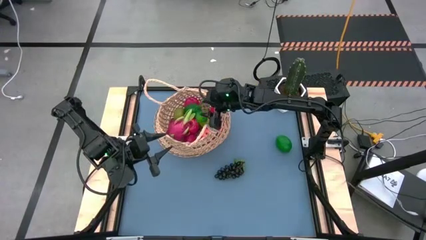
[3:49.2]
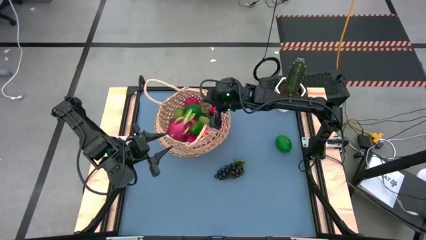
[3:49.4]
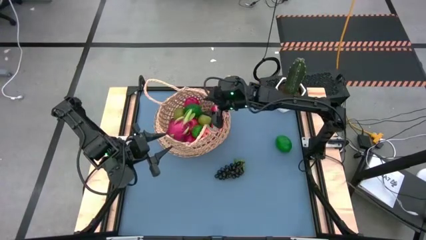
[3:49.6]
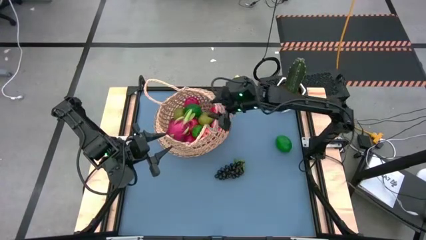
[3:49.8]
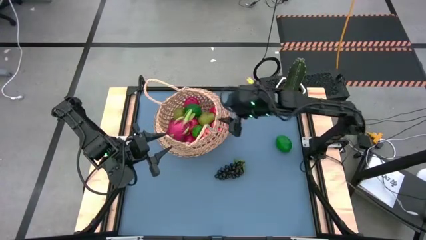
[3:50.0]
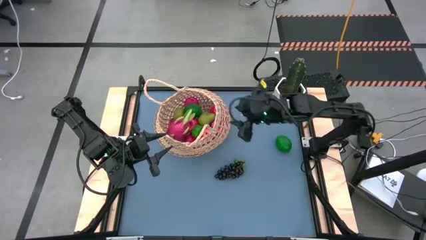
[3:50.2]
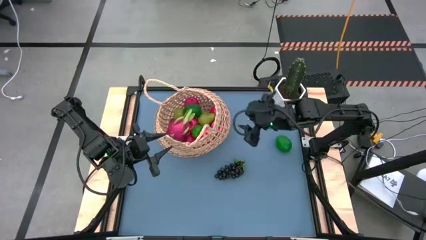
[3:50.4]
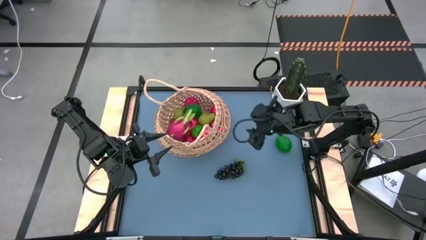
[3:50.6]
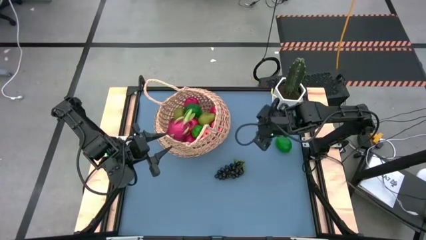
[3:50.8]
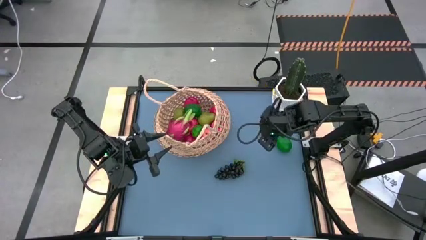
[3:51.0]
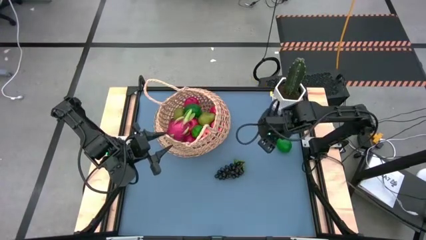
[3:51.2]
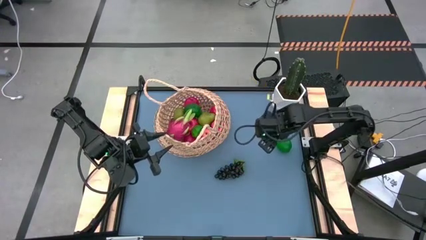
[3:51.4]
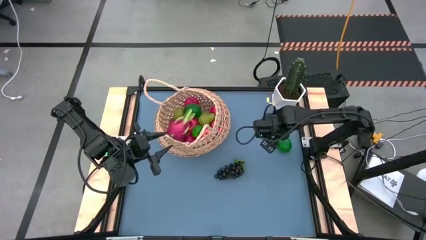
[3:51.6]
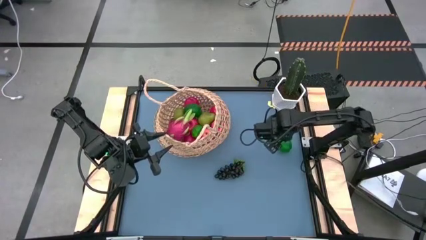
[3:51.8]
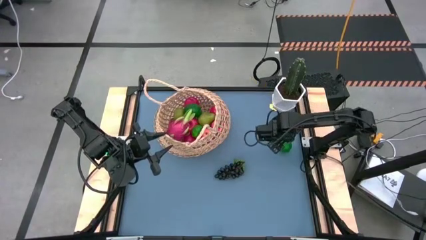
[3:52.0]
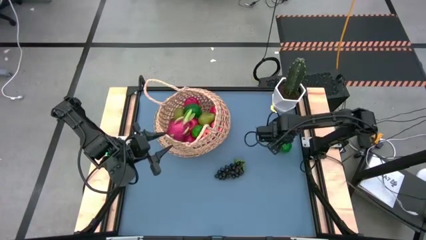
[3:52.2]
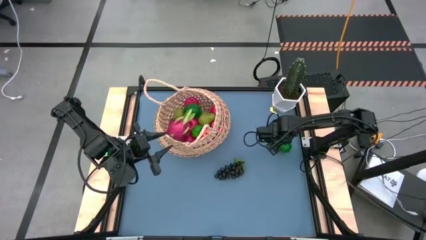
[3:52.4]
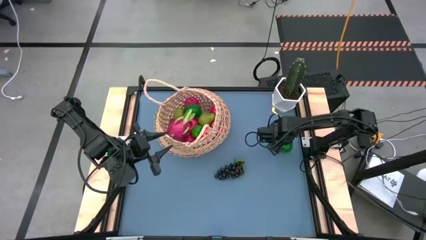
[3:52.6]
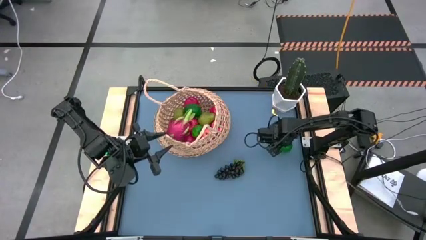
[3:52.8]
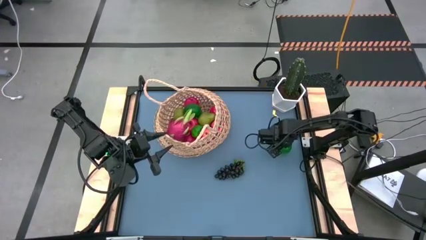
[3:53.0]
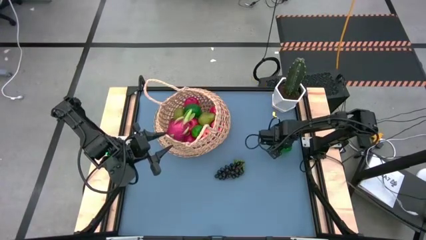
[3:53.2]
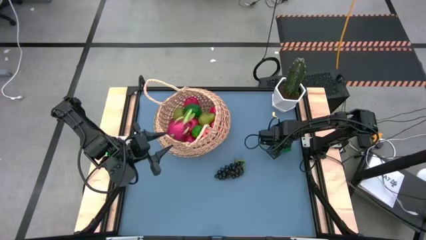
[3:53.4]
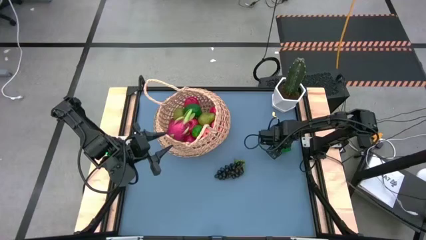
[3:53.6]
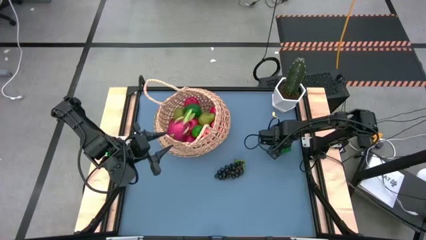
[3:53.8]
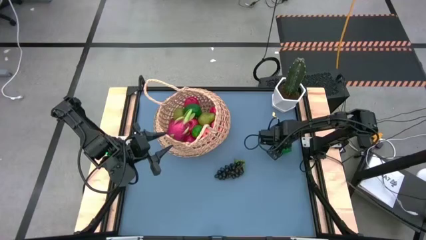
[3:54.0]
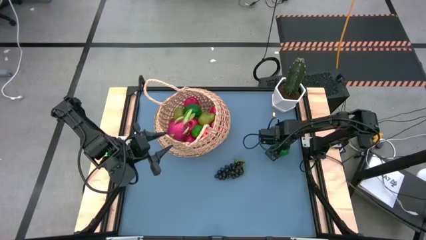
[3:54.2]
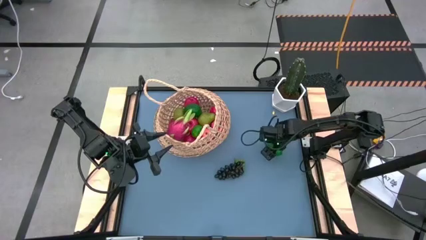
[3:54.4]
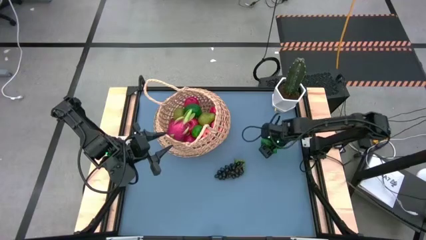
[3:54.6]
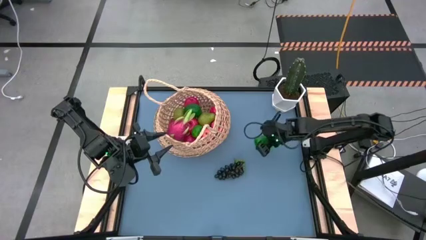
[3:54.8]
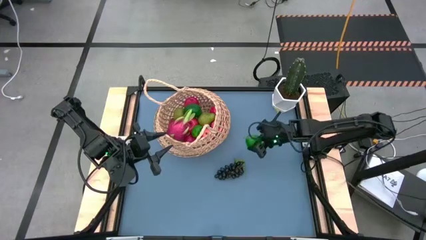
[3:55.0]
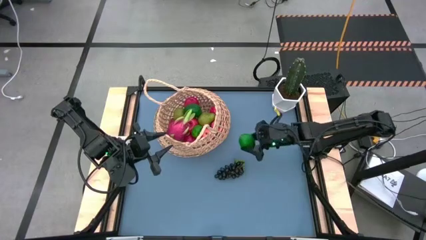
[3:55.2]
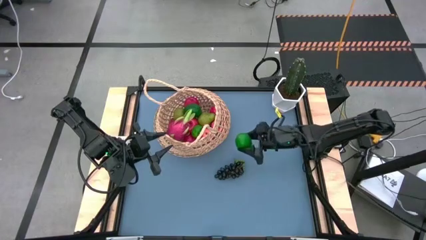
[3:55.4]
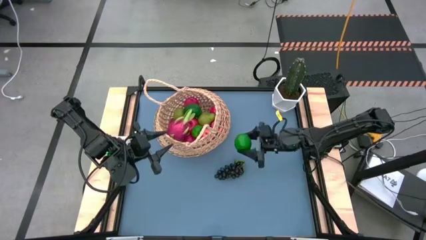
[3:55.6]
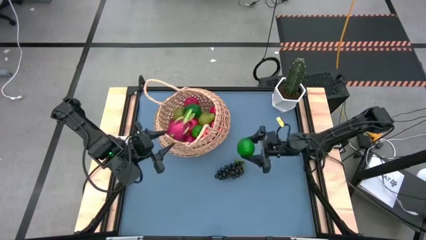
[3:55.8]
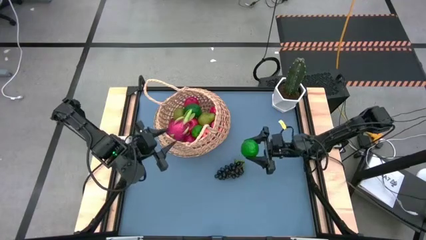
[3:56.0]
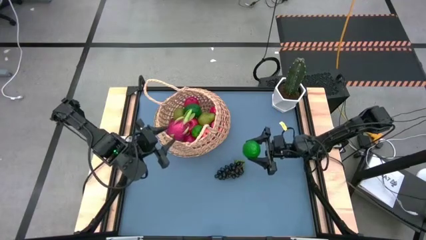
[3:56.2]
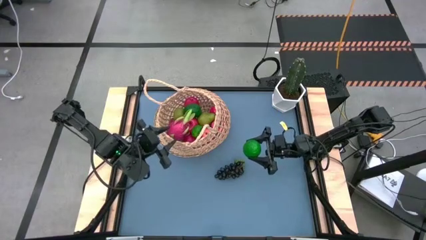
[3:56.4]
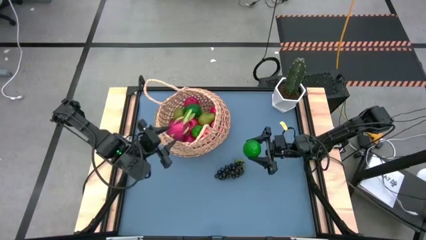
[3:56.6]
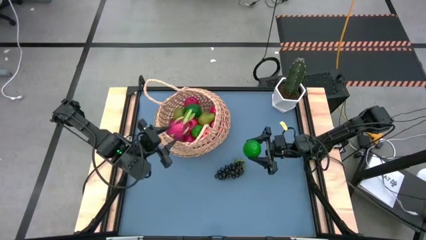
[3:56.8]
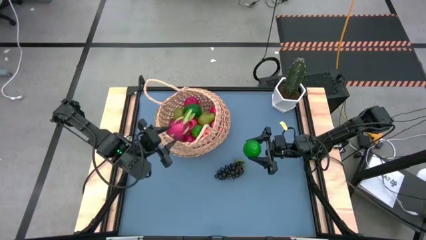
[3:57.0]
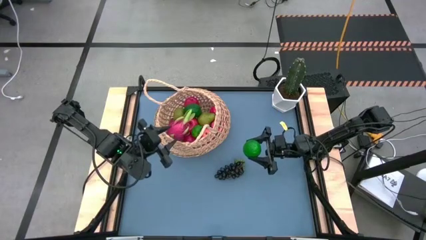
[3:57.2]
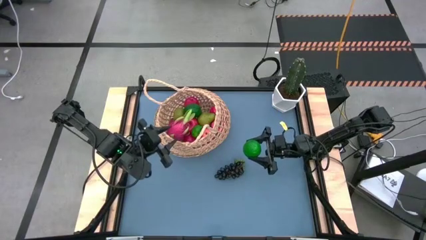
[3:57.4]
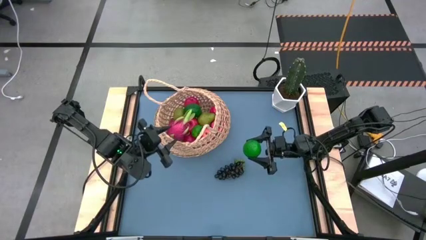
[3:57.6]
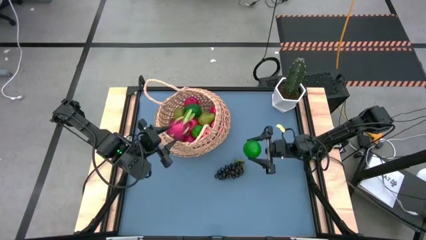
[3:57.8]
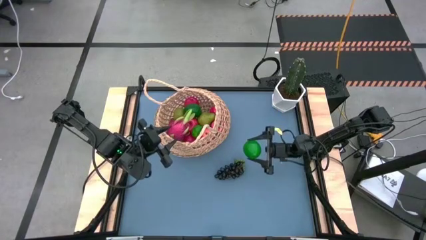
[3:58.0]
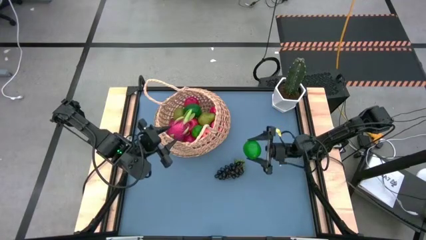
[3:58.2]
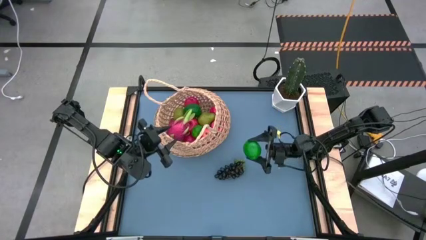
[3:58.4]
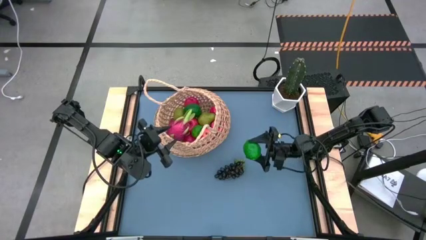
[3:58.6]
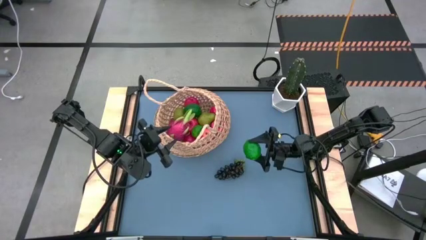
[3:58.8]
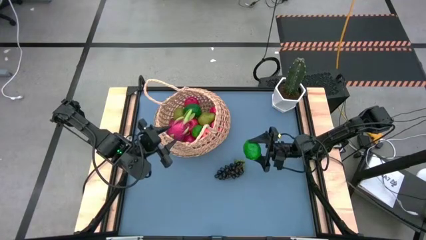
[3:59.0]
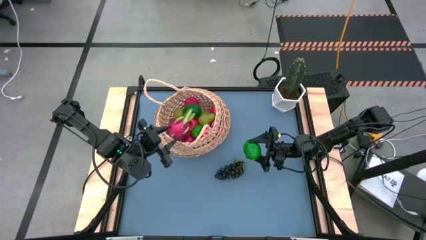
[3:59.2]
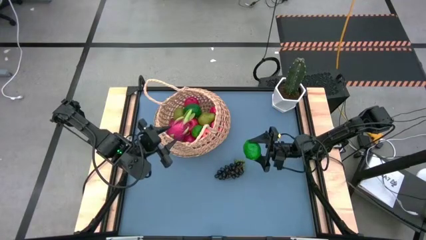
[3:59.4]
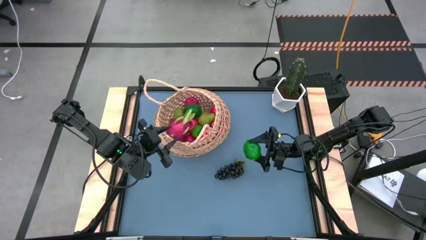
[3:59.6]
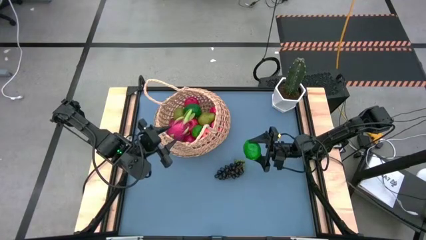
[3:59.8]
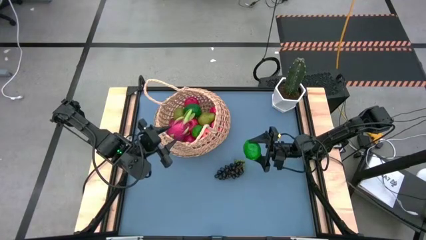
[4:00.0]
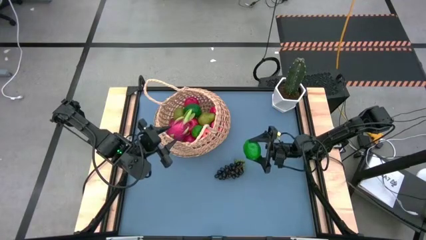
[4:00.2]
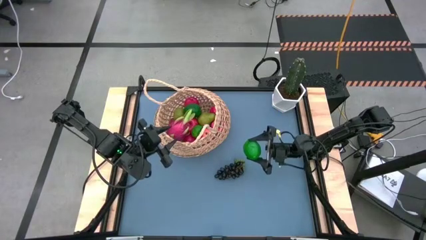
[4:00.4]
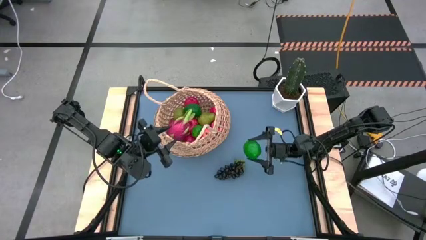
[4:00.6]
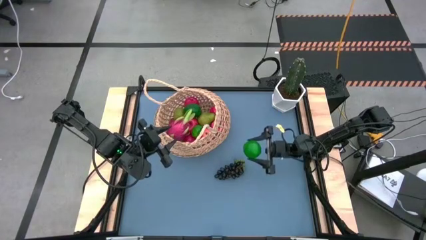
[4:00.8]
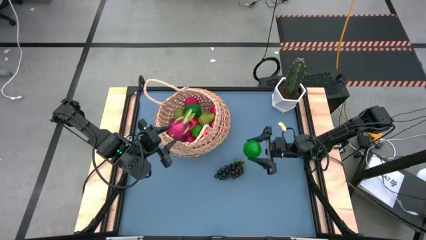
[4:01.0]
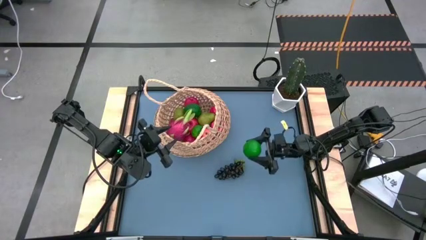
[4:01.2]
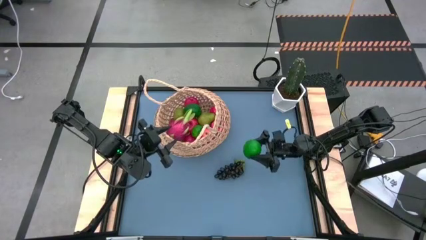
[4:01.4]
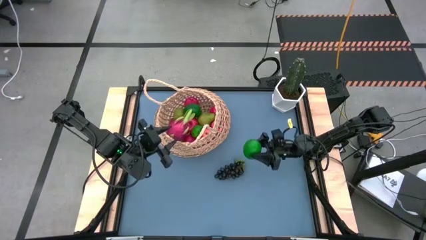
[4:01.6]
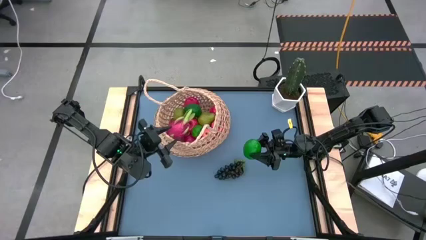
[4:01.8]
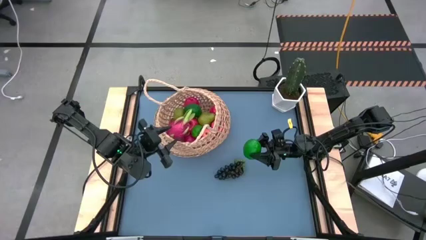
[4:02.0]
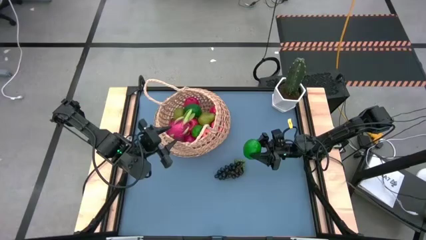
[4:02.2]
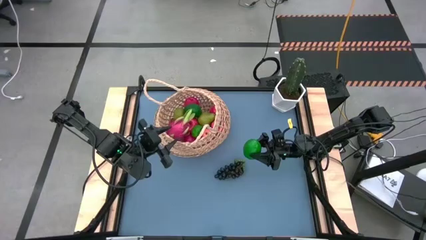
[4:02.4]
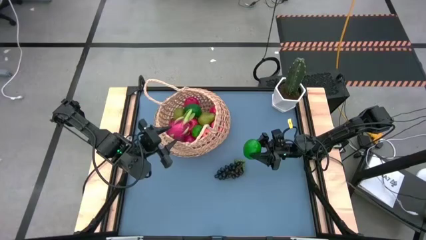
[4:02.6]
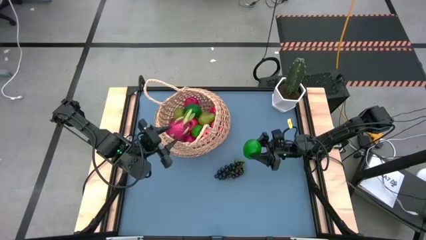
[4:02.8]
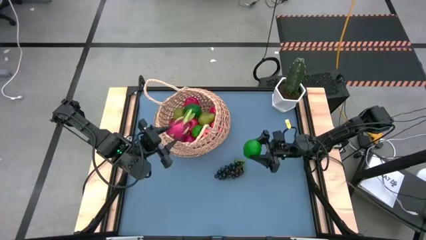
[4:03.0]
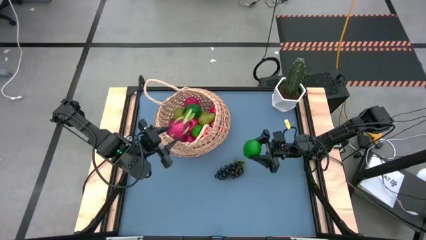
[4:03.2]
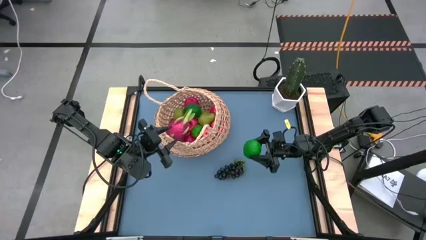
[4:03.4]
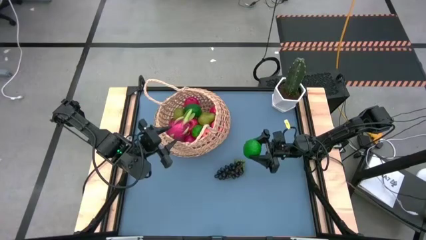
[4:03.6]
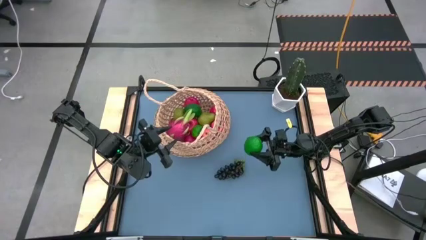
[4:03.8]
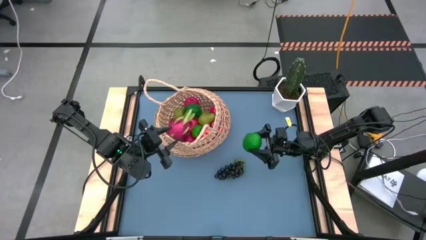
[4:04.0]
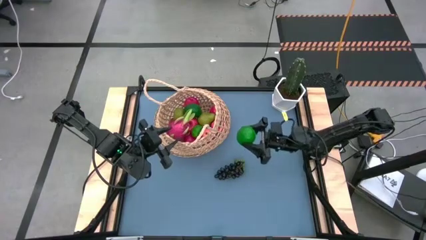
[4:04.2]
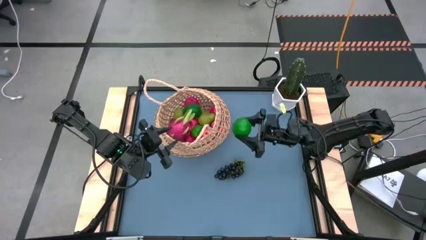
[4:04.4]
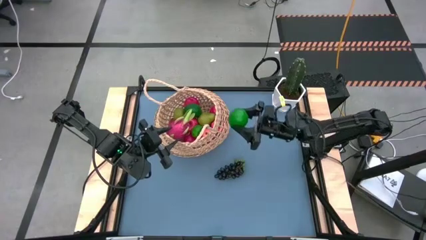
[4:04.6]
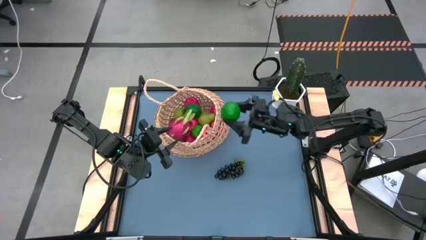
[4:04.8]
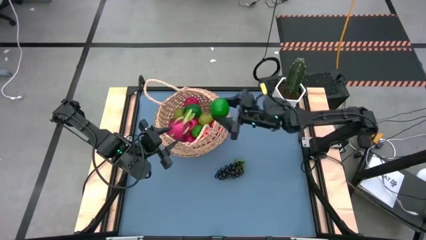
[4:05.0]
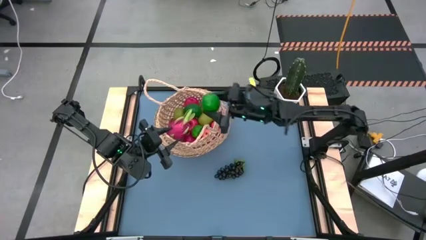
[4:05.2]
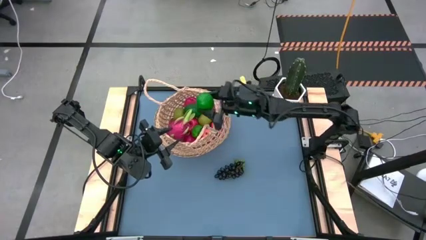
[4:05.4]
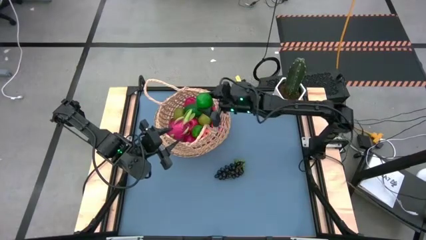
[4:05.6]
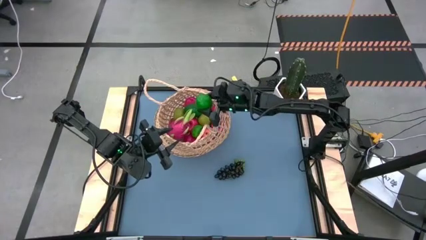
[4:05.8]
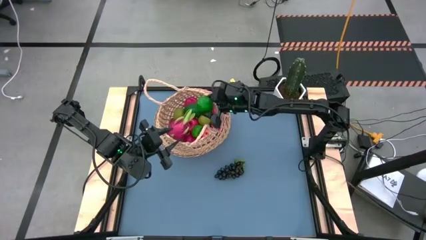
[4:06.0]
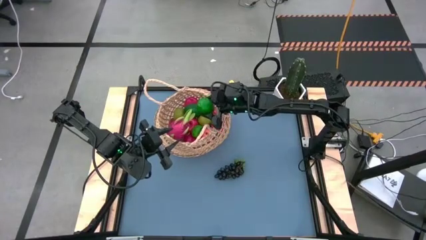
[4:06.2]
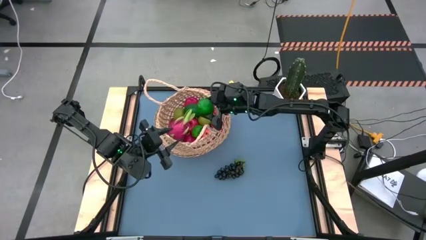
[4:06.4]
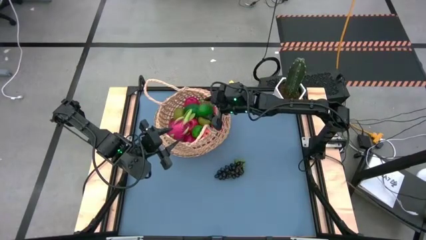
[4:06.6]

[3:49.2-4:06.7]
Task: Build produce basket
Put the green lime into the basket
